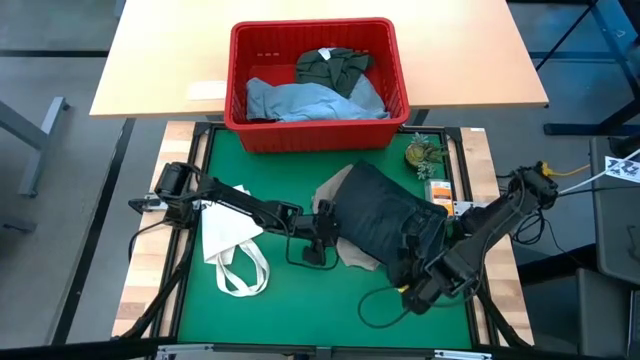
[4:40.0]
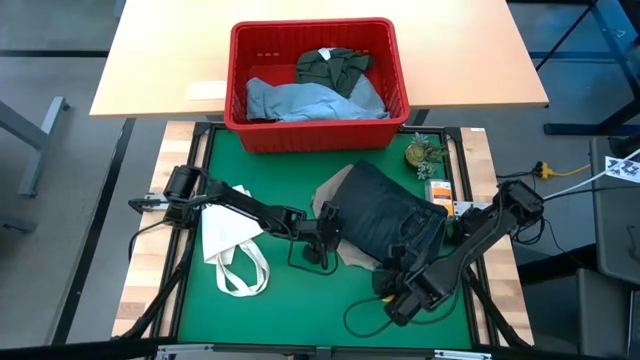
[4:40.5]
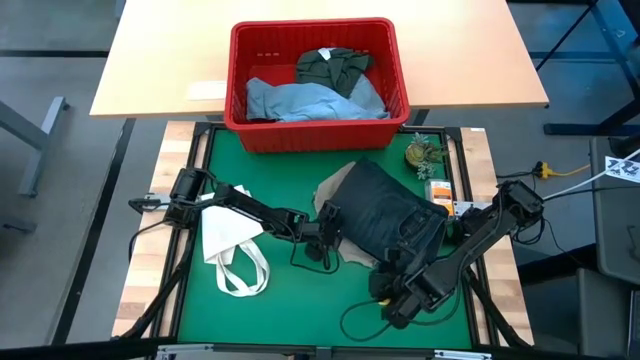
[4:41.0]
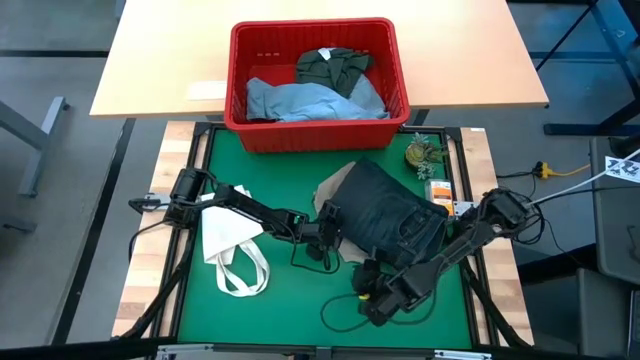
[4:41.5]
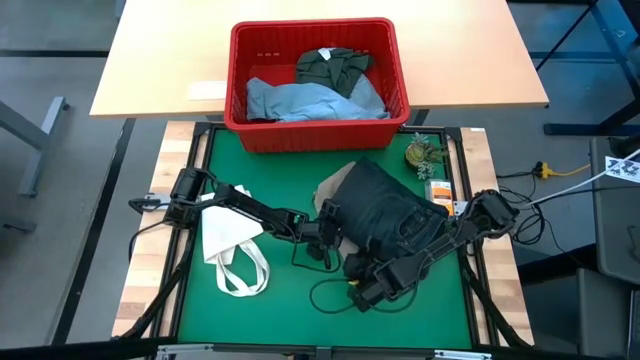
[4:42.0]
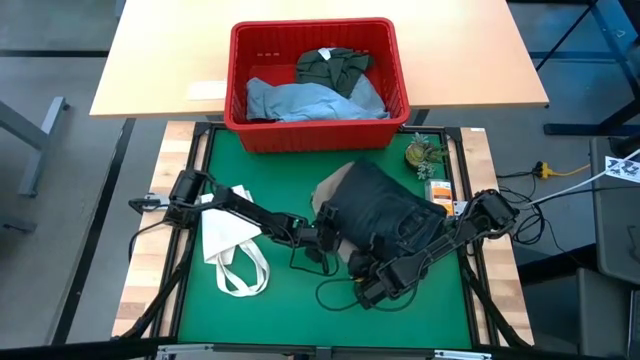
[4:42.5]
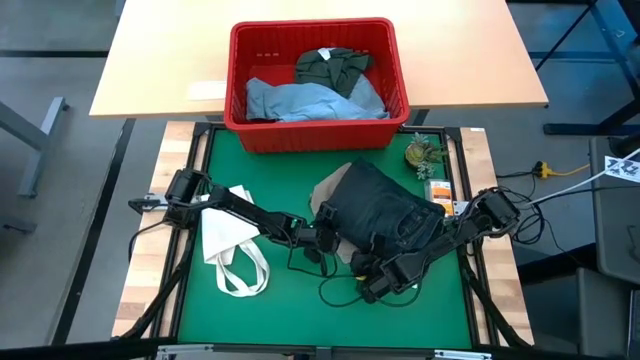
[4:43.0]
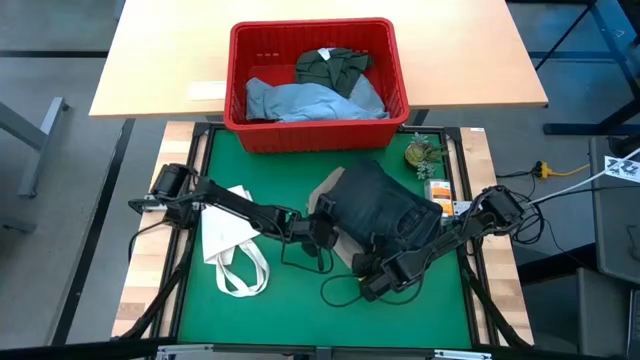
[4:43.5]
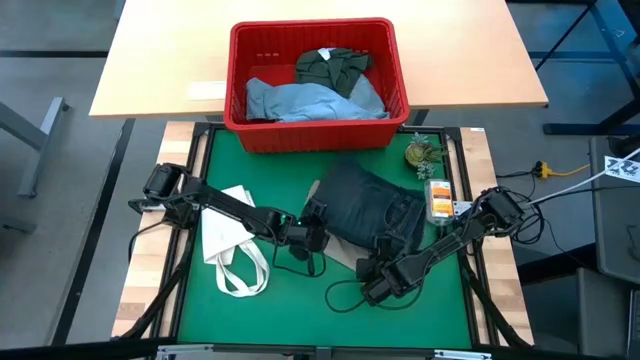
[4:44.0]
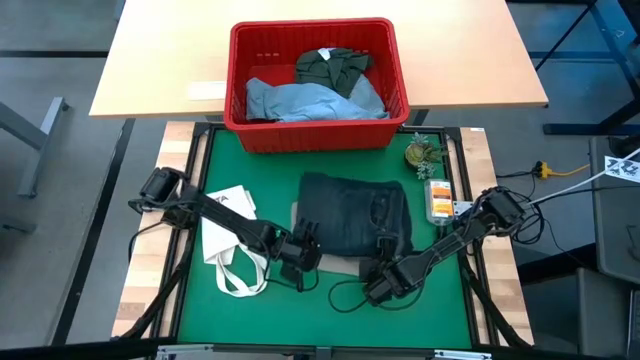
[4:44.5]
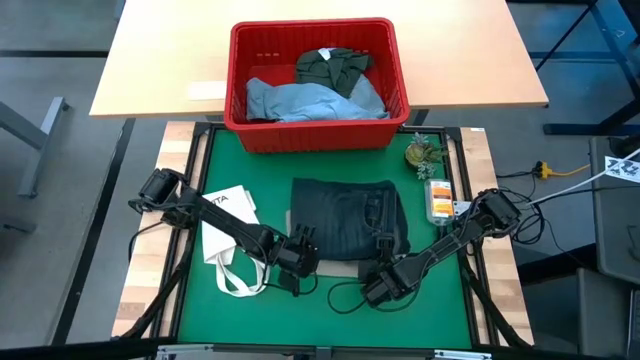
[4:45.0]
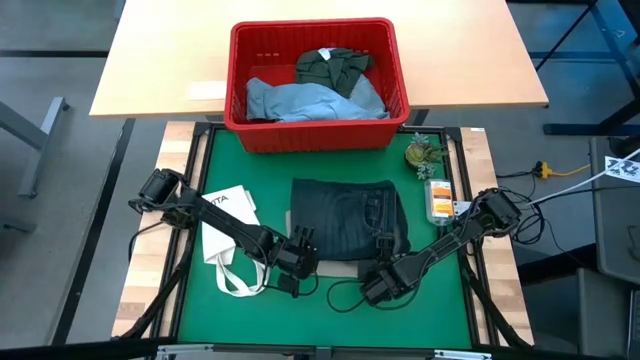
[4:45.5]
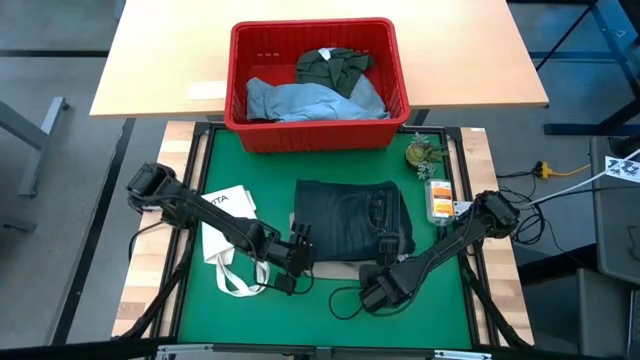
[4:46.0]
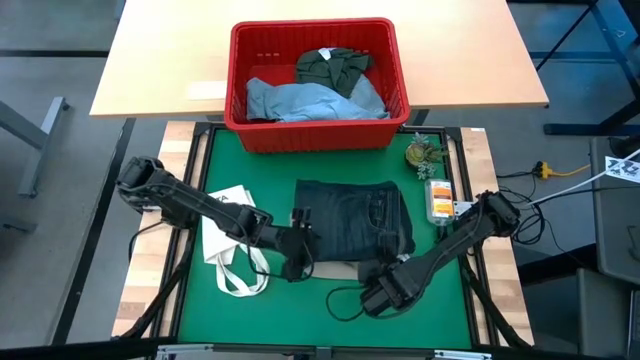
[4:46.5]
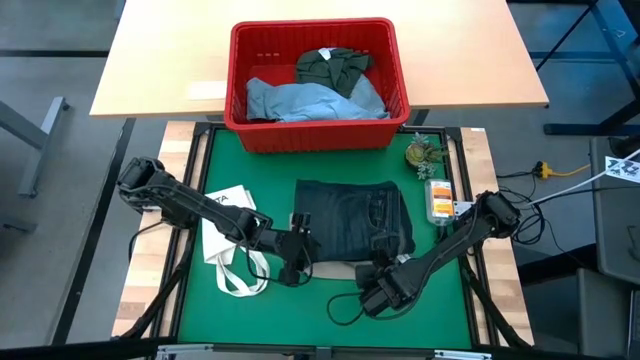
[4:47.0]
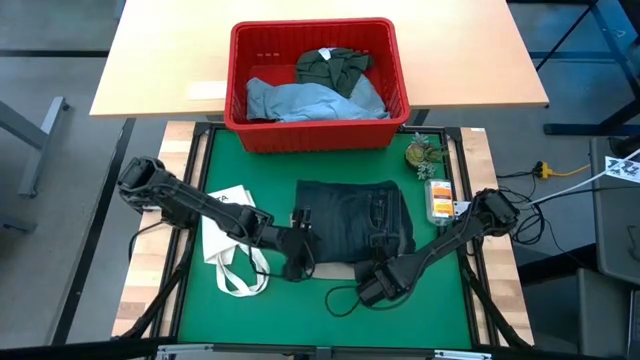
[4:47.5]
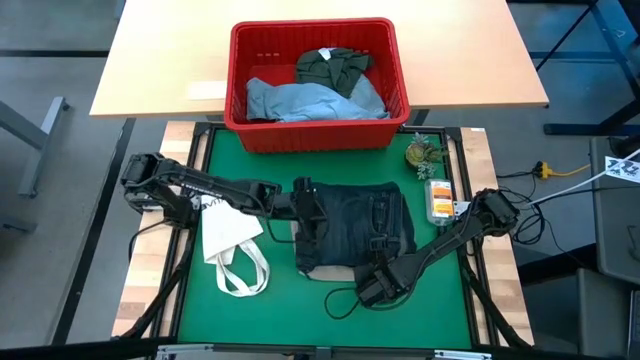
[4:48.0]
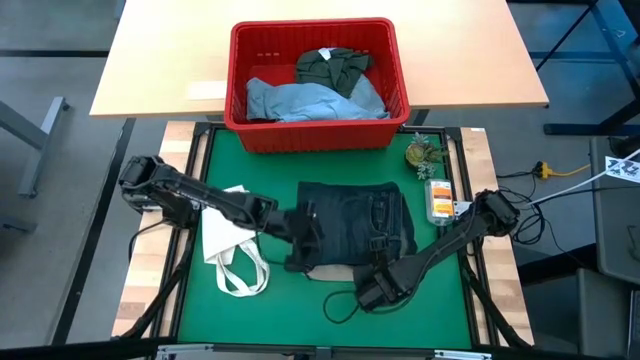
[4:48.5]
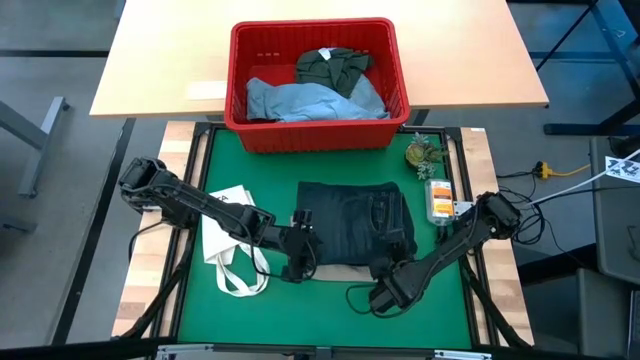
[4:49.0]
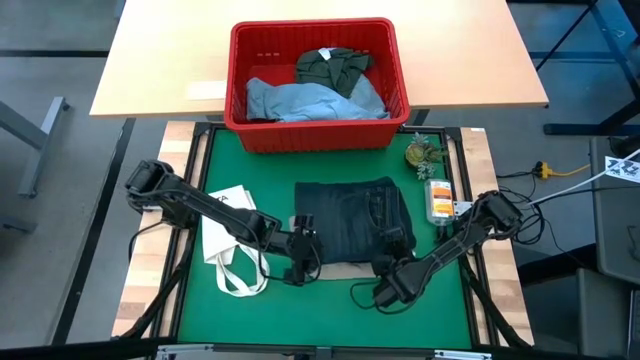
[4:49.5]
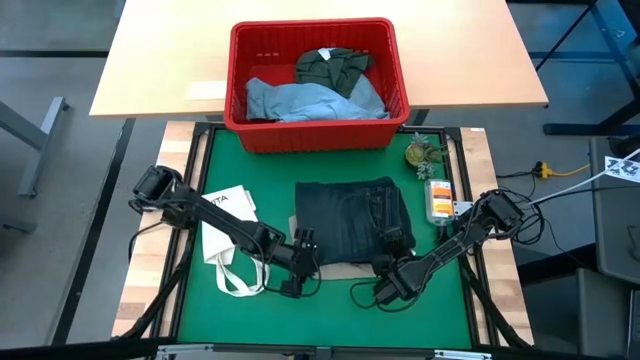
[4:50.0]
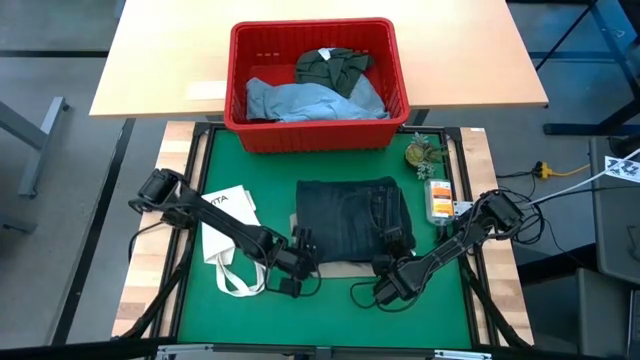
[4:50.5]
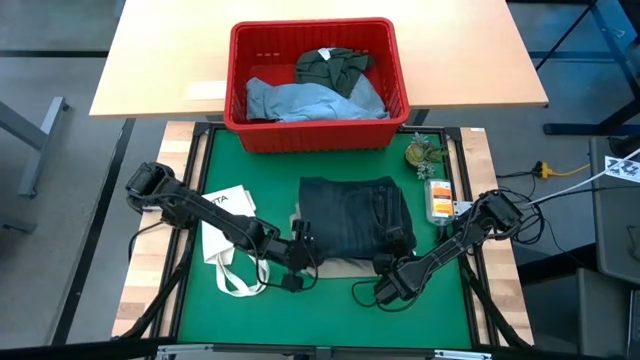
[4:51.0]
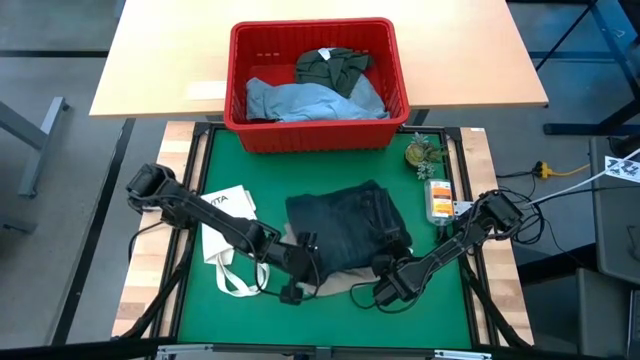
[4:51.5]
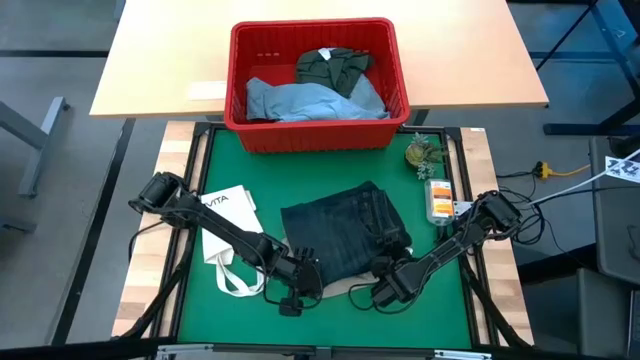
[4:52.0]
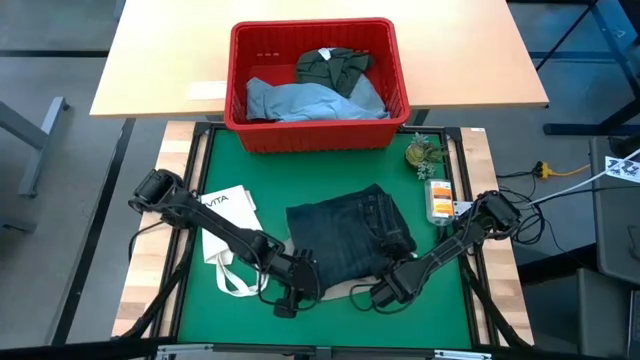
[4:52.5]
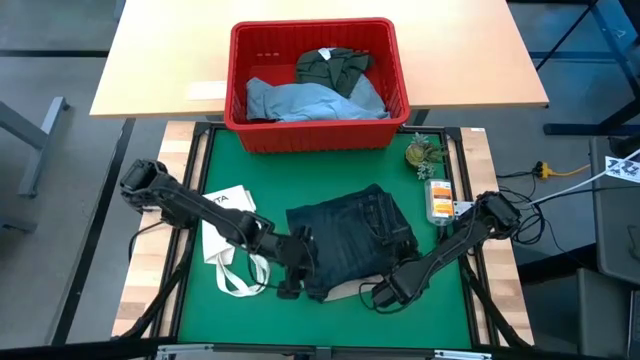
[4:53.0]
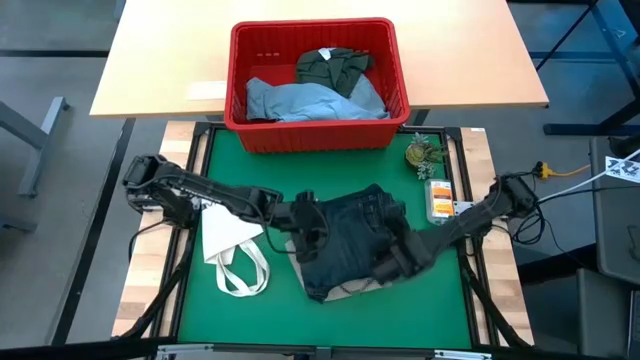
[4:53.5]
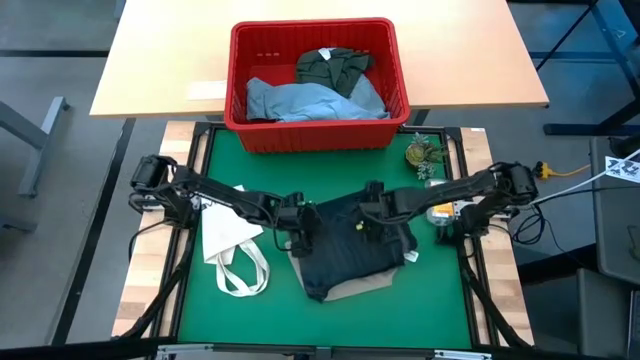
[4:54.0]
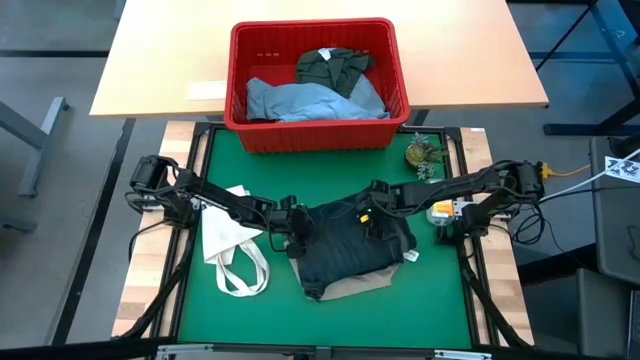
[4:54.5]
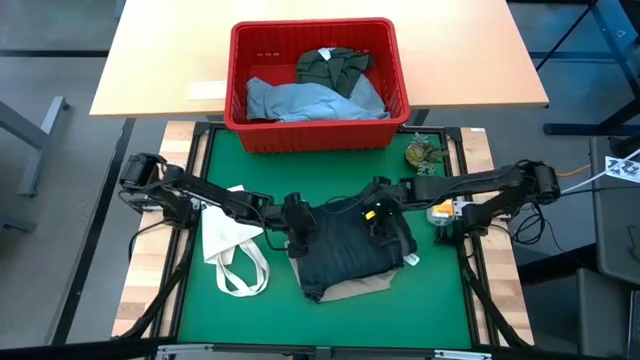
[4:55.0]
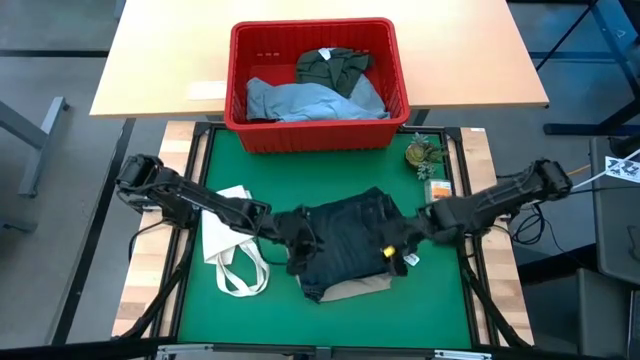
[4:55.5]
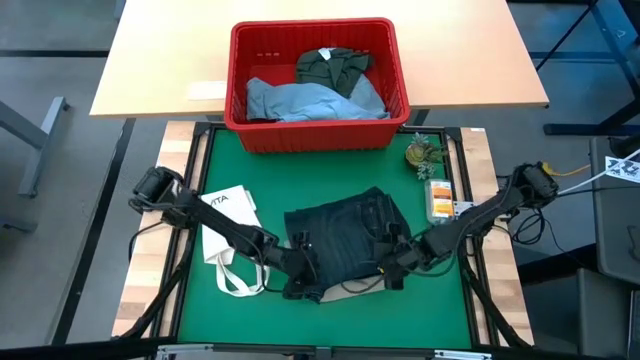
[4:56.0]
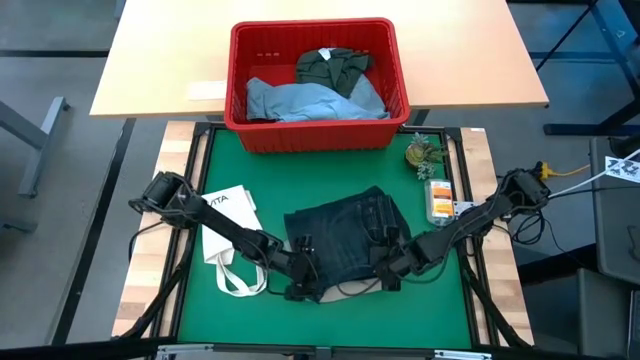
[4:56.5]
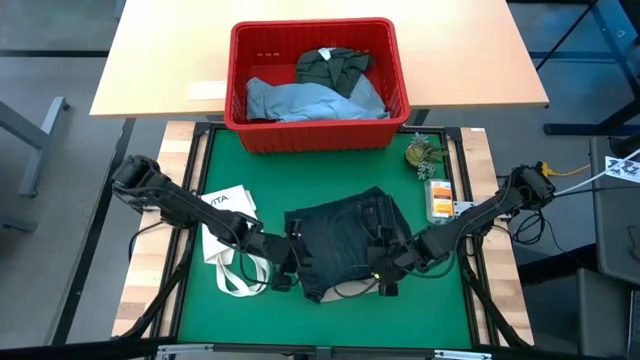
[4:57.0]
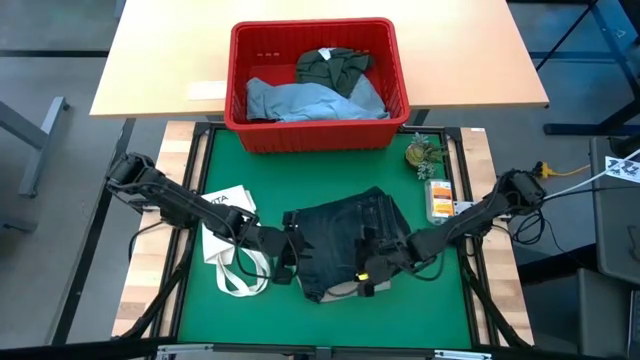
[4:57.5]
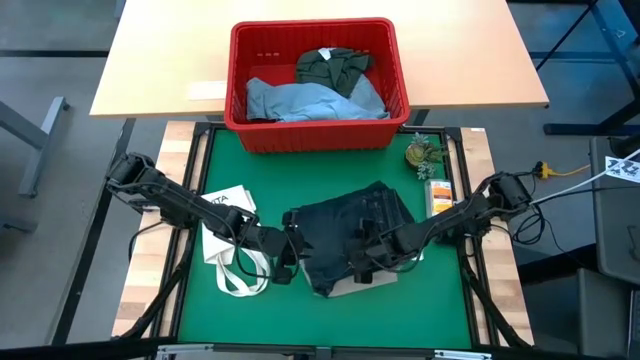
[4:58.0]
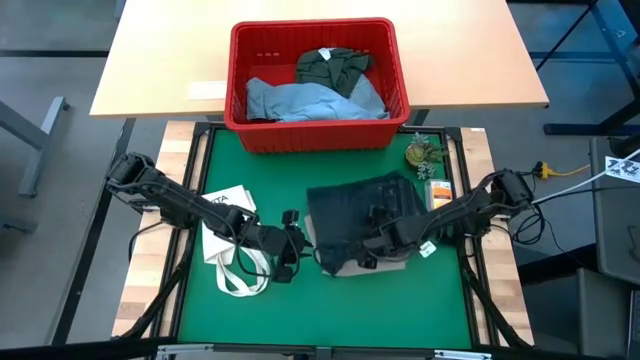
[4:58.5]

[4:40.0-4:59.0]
Task: Fold Laundry from Bin
Stack the dark blue jeans on top of the gray shorts

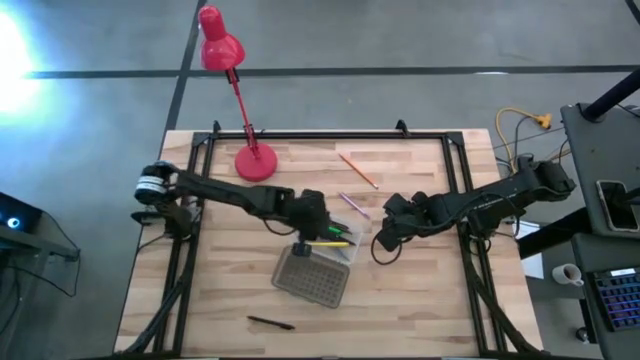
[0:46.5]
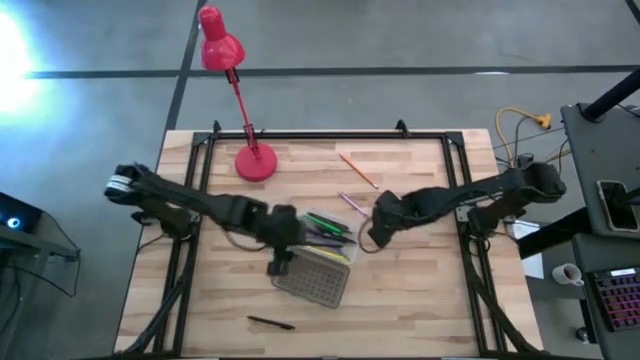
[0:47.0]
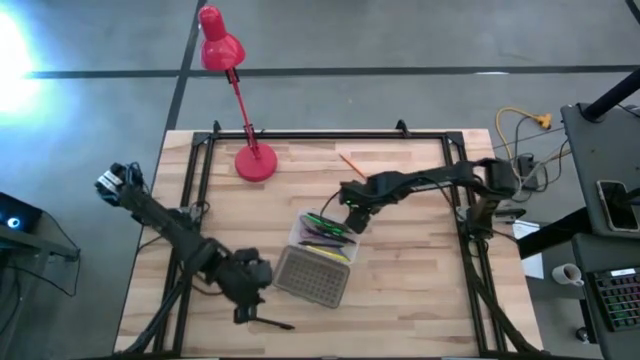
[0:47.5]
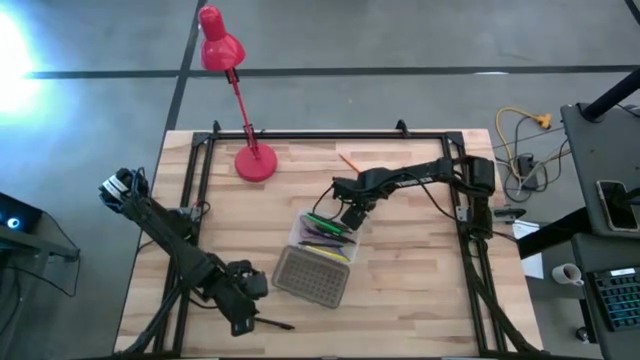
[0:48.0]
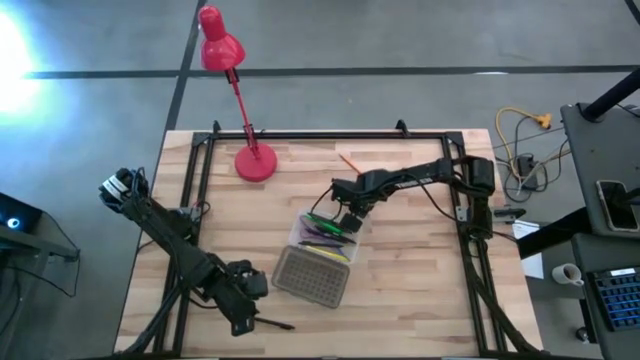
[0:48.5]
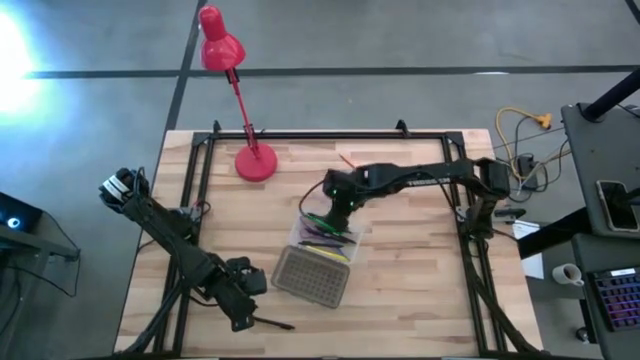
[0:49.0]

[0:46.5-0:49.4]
Task: Pick & place school supplies into a supply box
Put the white pen into the supply box

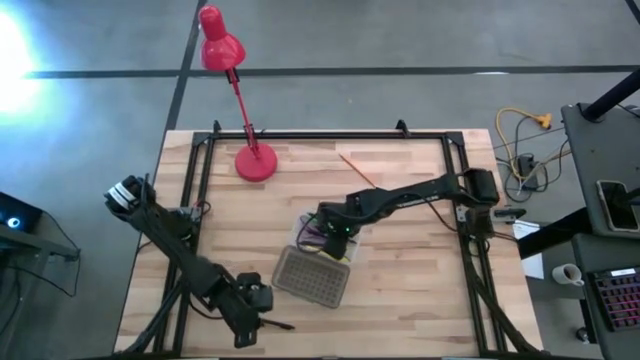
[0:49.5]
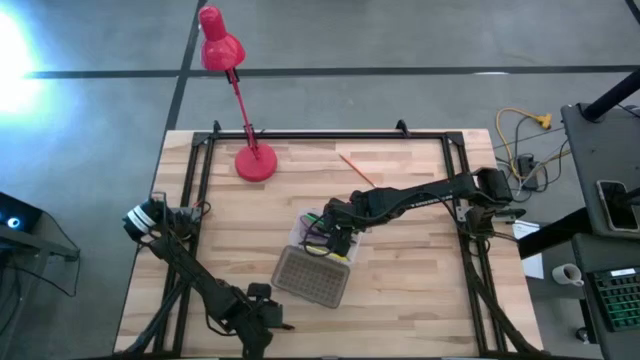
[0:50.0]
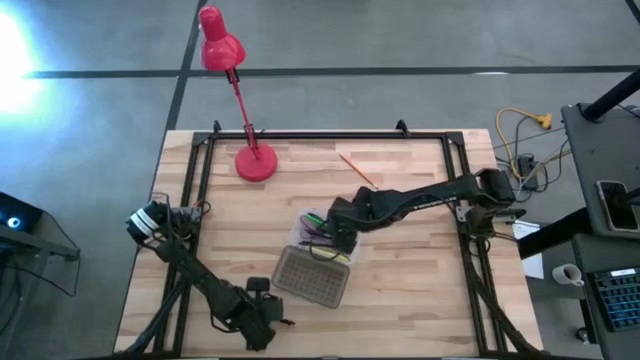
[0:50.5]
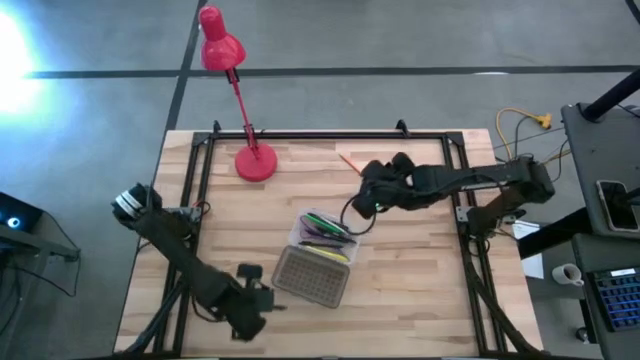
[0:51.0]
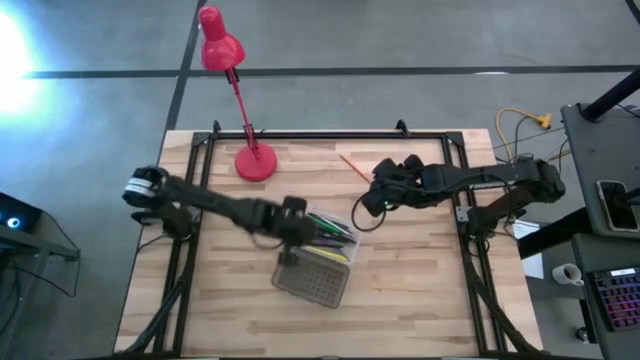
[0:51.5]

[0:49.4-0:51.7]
Put the black pen into the supply box
